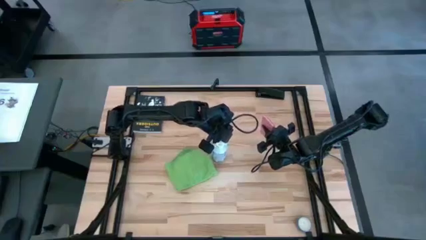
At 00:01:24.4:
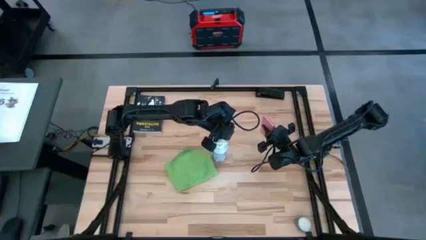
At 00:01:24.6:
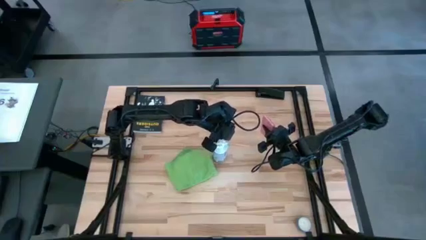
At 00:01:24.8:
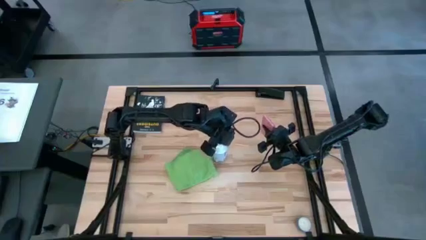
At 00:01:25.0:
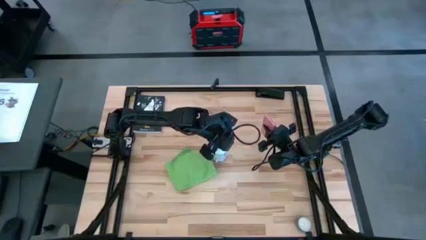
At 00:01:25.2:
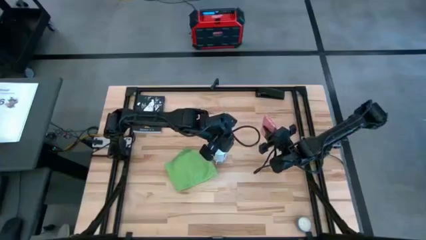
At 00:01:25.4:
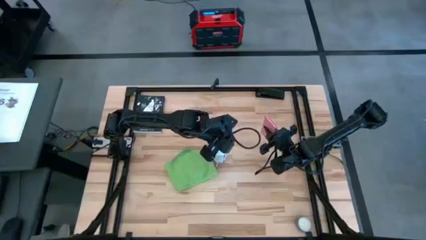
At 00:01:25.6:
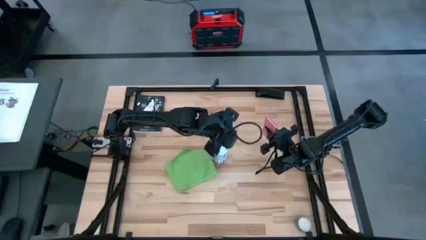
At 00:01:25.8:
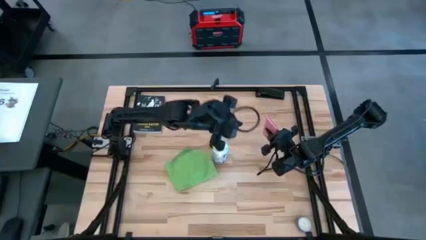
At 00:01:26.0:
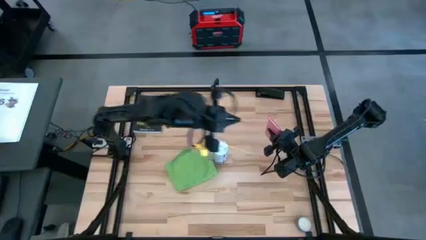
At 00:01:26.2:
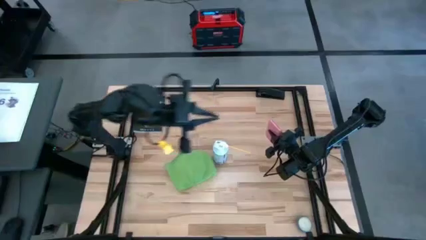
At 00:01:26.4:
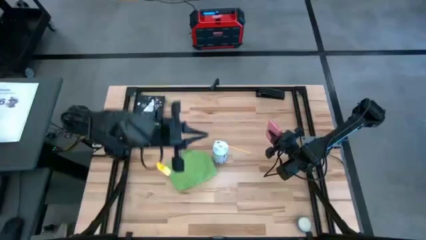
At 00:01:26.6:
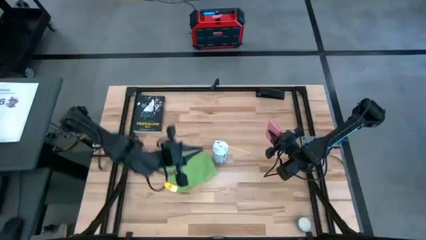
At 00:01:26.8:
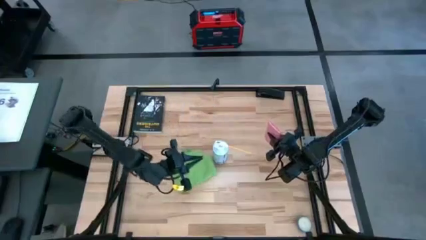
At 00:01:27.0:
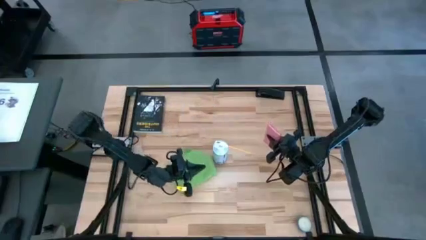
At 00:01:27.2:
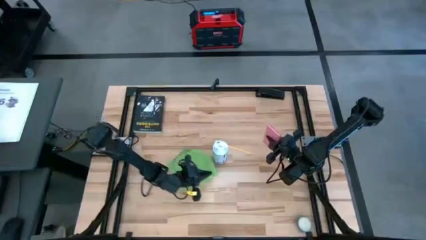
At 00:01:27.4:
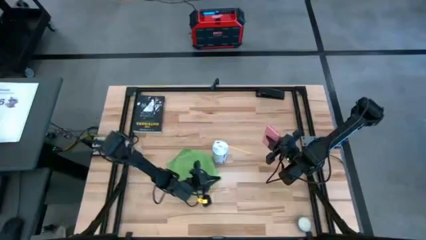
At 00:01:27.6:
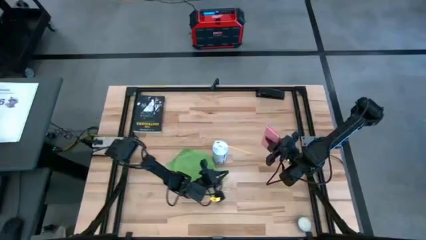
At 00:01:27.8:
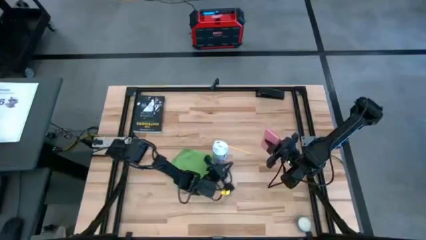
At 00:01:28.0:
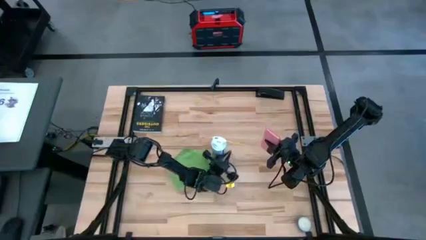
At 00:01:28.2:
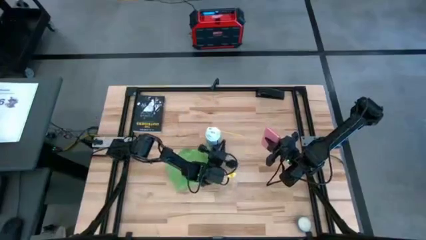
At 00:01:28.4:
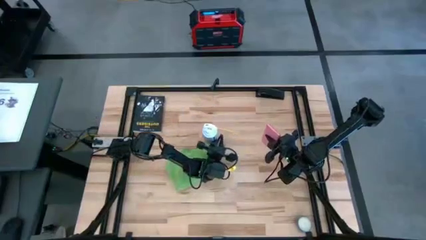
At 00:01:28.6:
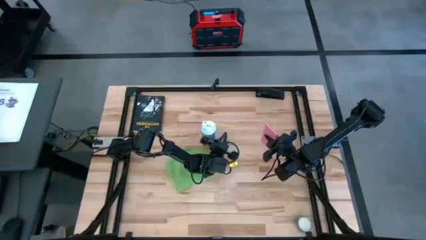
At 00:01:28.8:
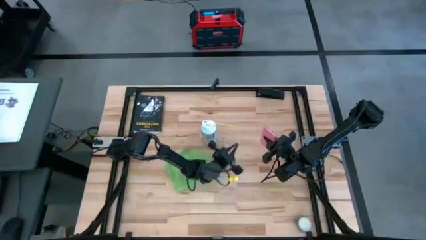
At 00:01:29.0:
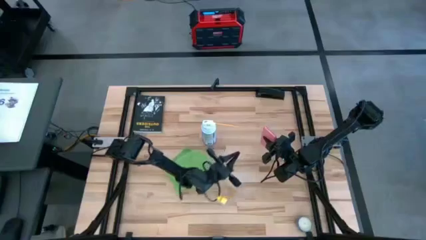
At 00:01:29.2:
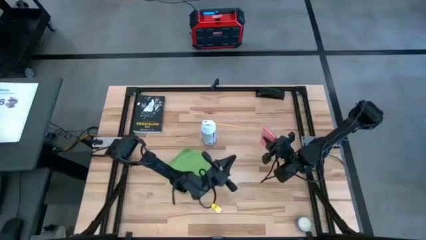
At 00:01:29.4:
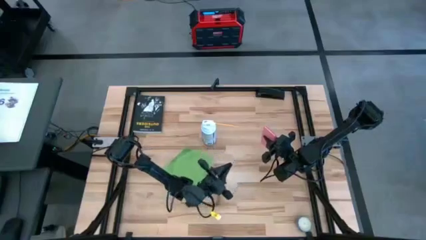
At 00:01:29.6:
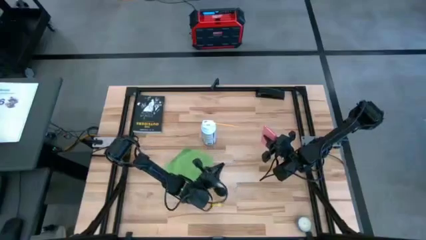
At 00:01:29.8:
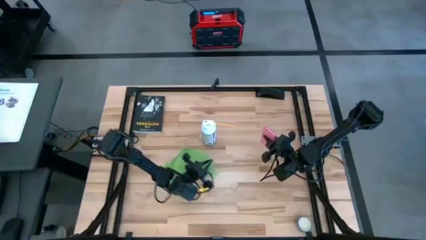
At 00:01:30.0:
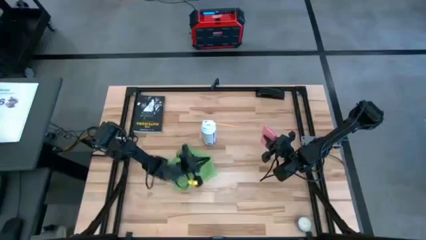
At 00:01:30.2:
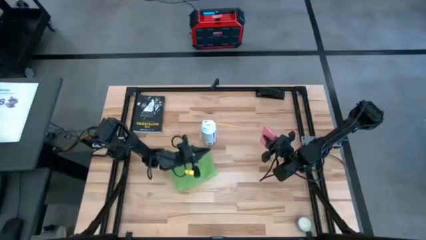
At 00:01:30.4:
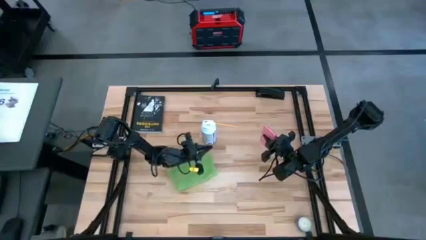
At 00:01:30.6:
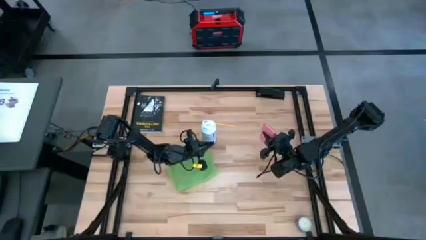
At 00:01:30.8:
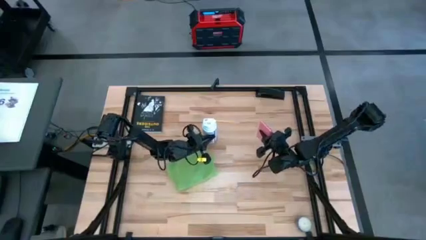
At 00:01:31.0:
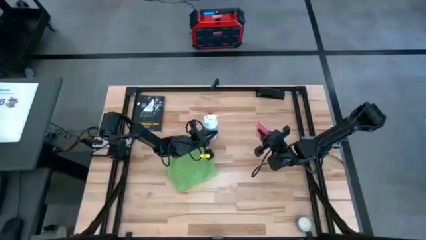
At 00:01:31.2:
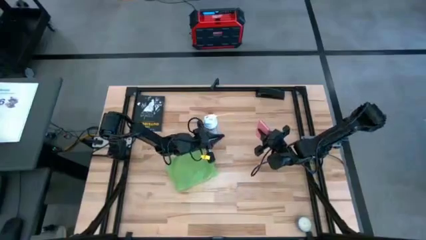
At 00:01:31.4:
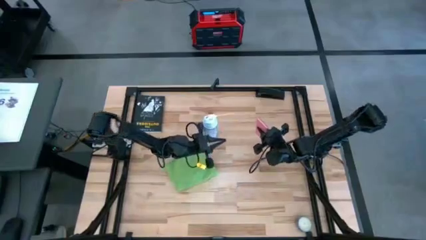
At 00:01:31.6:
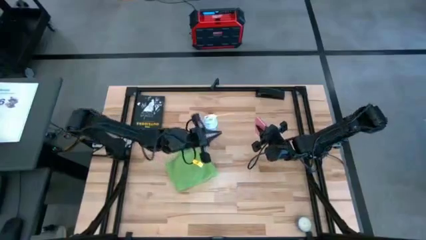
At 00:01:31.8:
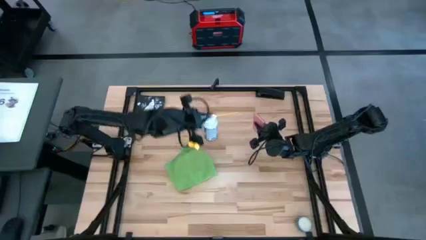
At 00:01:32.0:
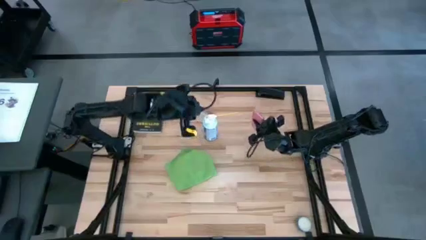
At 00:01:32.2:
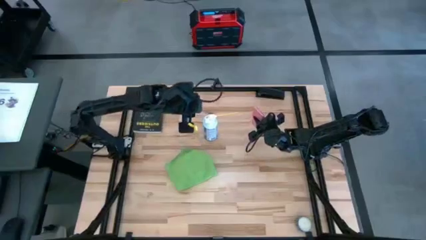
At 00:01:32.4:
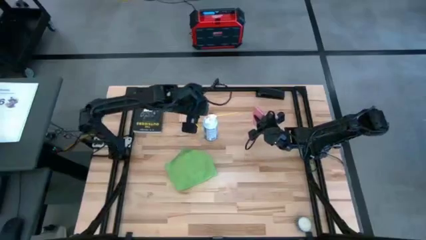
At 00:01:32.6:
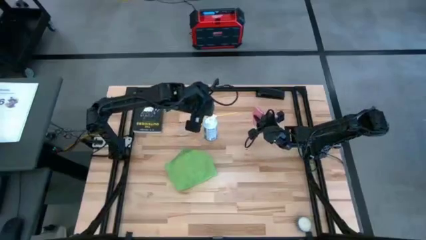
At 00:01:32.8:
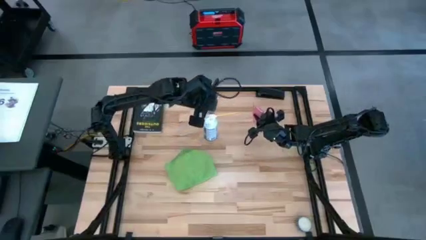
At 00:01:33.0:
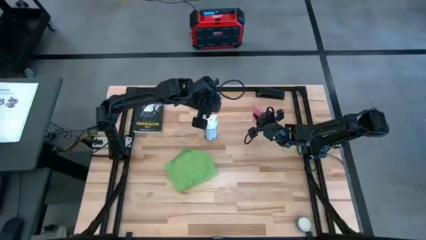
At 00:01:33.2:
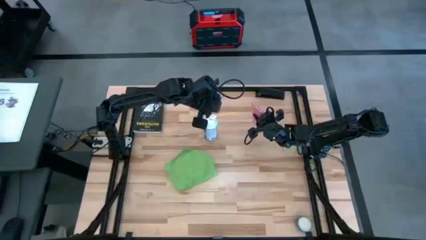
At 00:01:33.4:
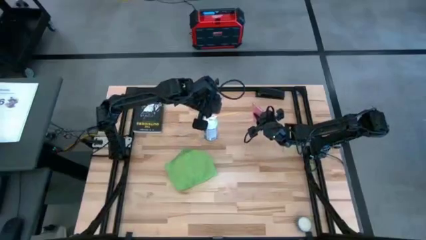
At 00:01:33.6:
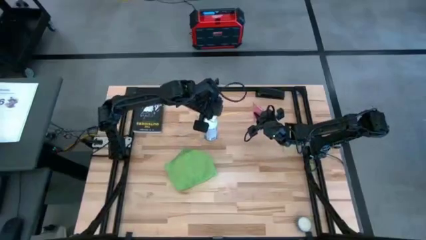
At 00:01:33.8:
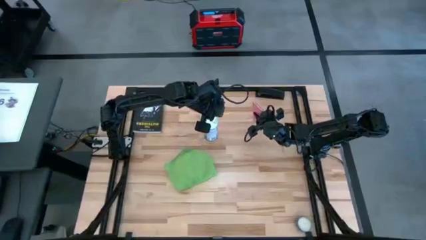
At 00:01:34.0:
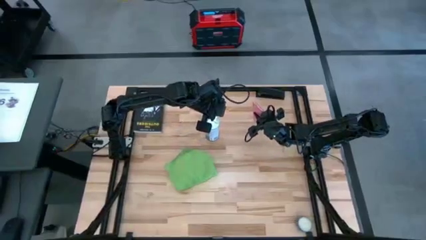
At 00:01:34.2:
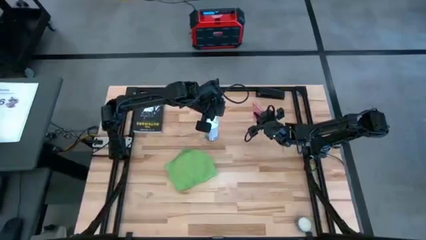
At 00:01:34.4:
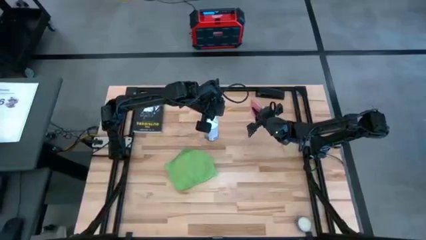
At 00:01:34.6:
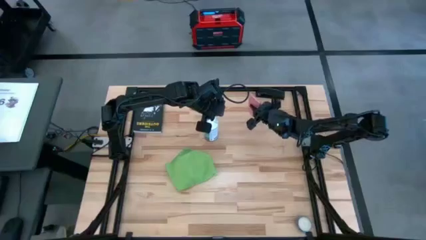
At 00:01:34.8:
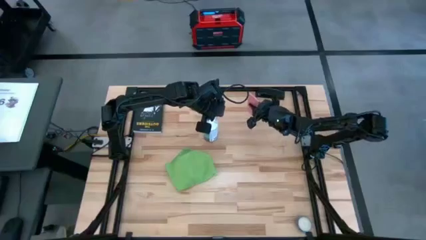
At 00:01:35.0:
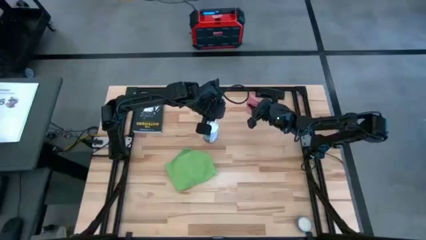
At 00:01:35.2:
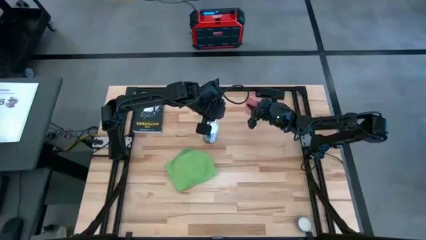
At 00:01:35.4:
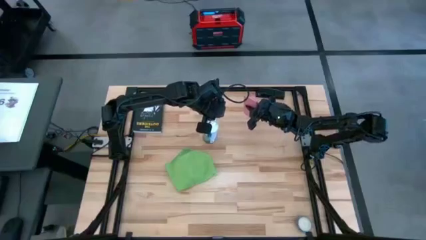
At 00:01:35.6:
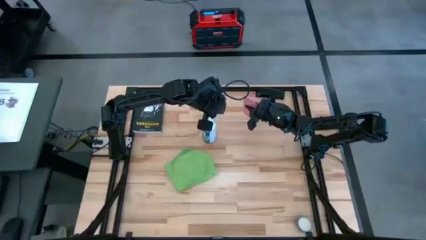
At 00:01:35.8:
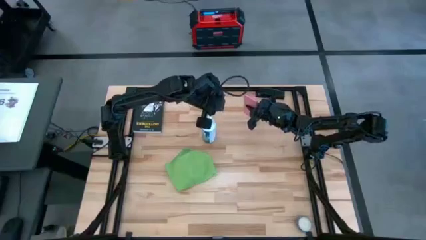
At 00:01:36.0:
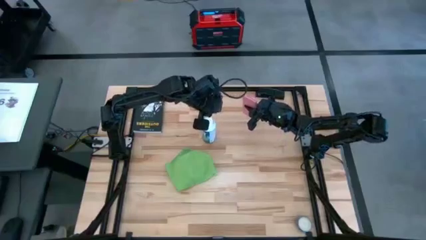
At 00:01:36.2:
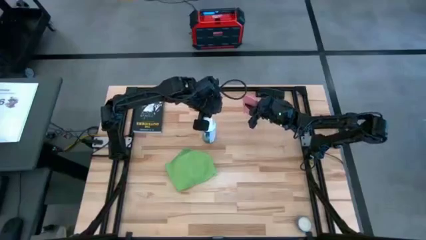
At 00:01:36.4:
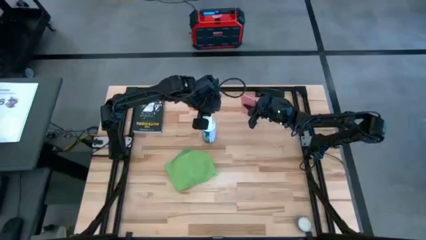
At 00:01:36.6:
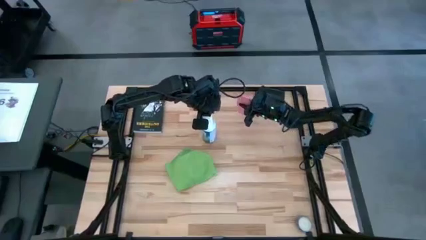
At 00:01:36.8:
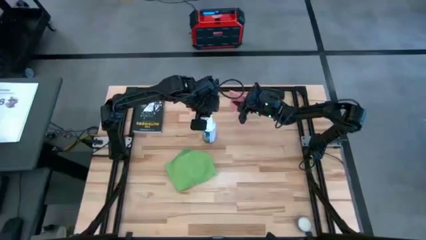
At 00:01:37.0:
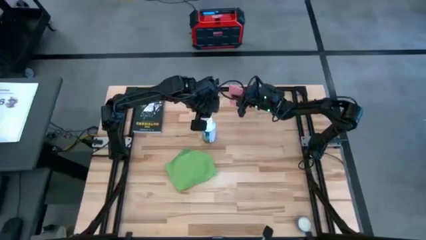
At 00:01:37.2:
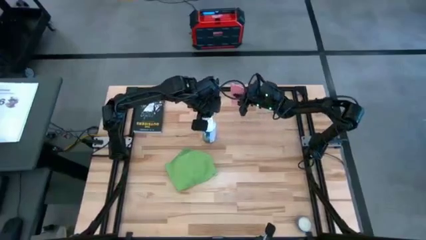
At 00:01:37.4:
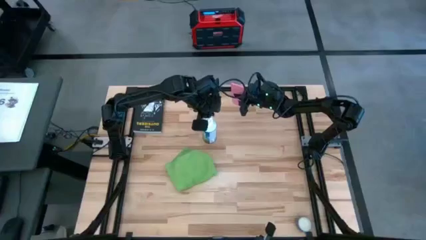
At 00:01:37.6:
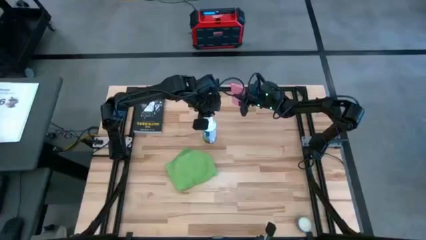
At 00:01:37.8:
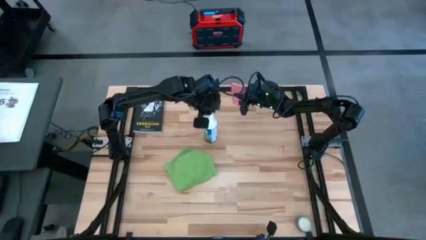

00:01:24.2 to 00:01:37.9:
Task: Apply microfiber cloth
Spray the pink cellphone using the spray bottle

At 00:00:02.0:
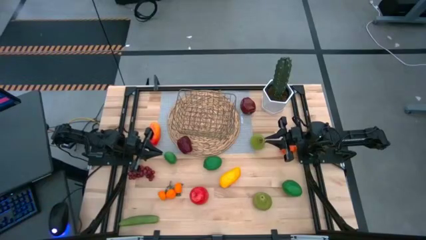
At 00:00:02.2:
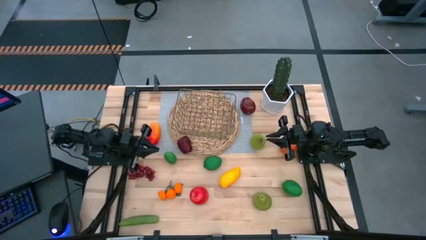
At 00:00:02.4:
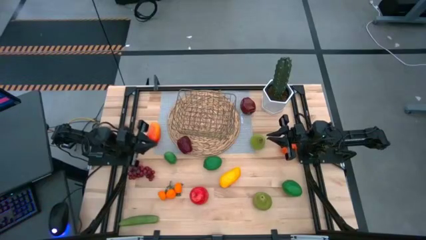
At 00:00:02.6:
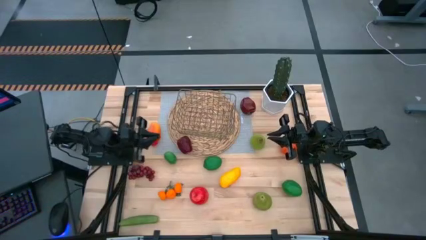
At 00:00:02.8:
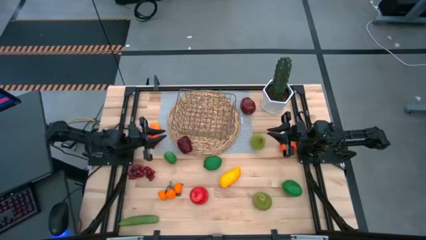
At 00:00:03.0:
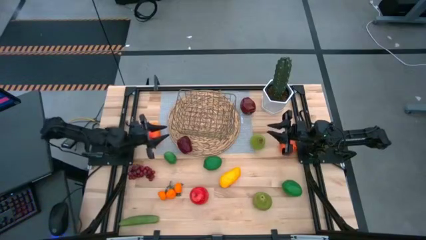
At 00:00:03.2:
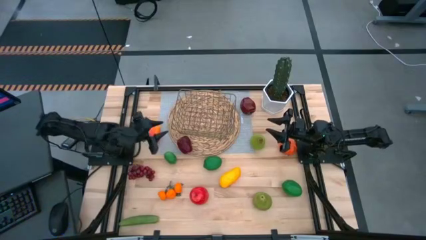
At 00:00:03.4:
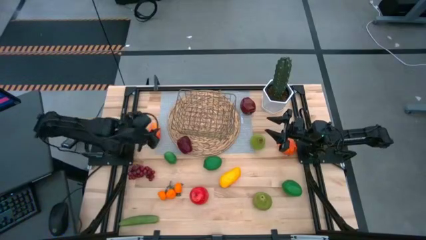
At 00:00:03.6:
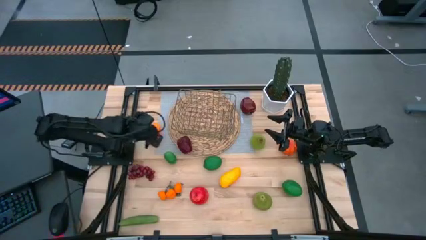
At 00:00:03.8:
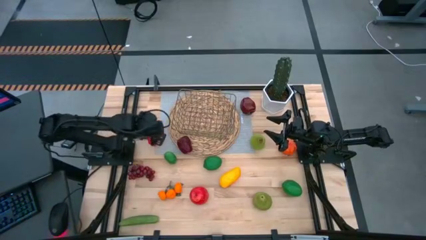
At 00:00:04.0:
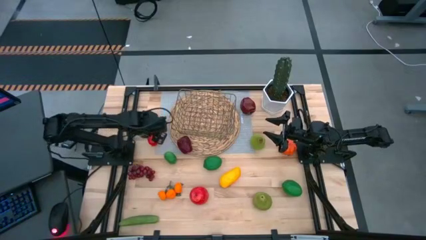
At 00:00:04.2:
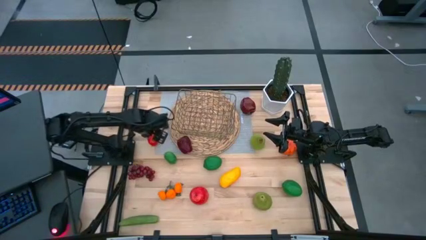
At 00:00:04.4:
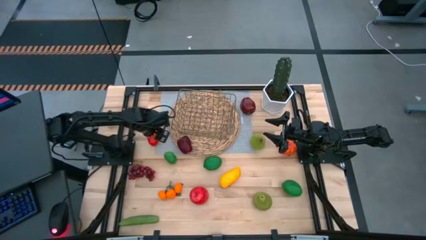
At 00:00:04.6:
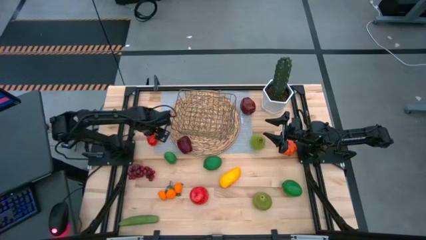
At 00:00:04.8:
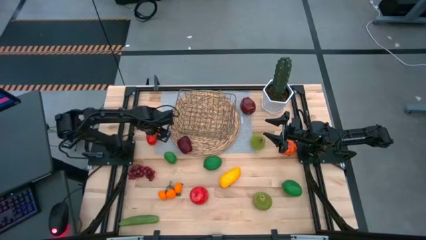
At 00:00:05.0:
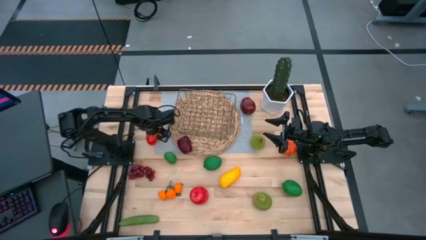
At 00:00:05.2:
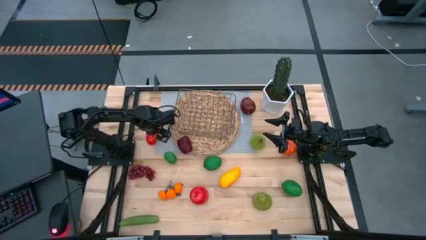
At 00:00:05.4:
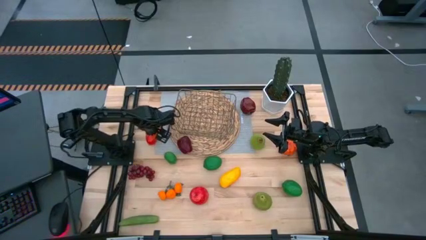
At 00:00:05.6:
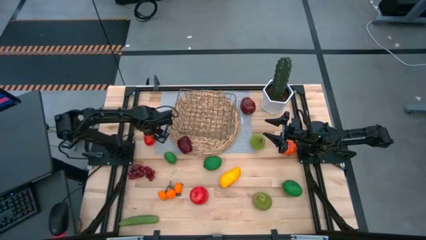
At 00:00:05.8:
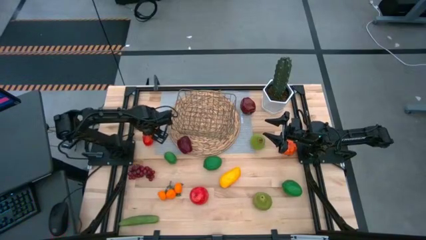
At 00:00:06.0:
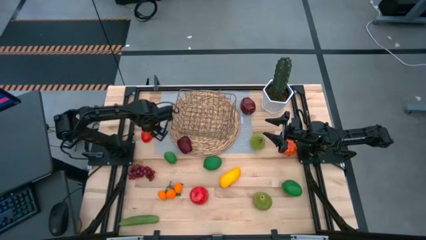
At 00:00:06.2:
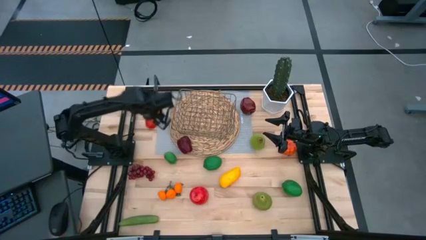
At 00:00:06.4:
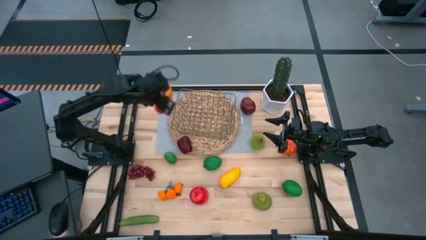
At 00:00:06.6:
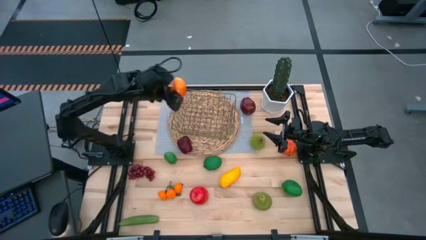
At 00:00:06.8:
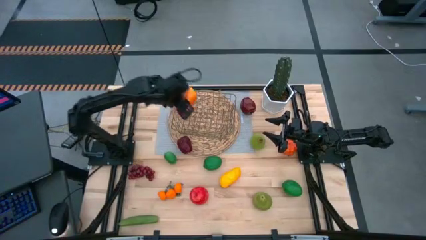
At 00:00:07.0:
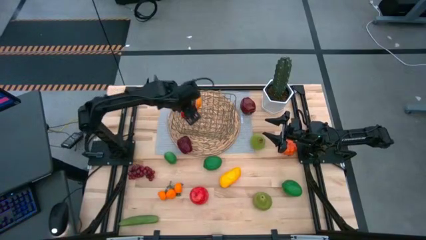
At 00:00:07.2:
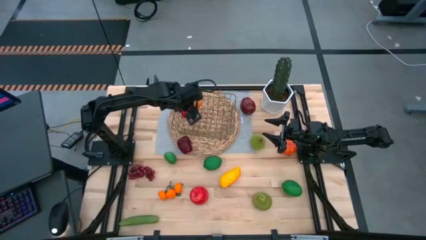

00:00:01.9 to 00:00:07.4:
Task: Build produce basket
Put the red mango into the gold wire basket
